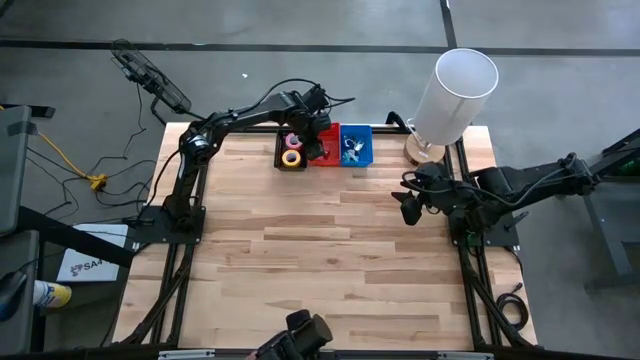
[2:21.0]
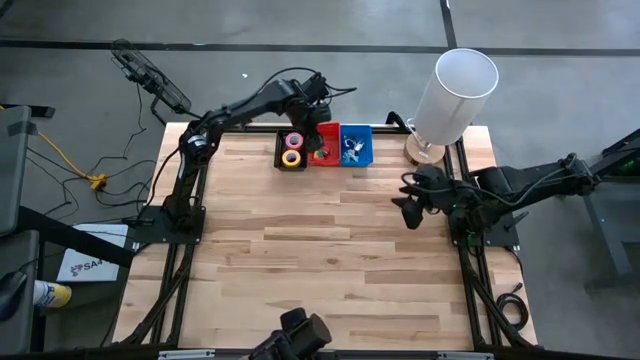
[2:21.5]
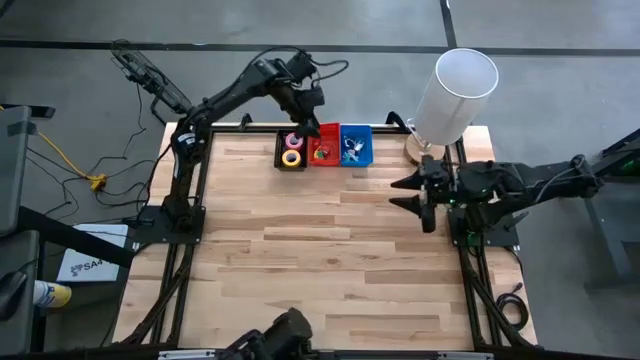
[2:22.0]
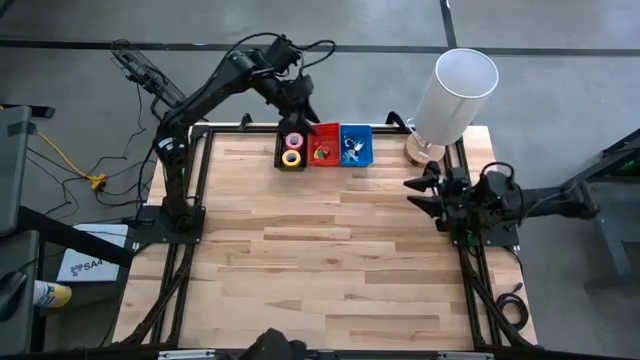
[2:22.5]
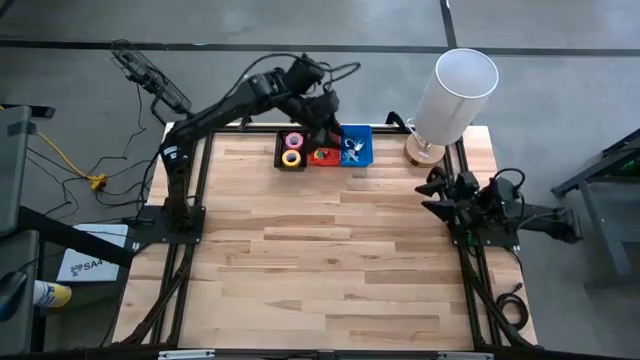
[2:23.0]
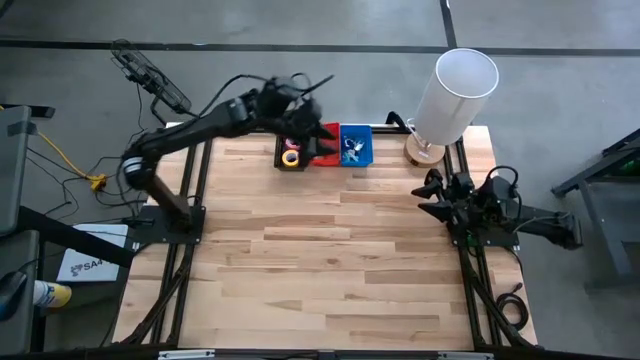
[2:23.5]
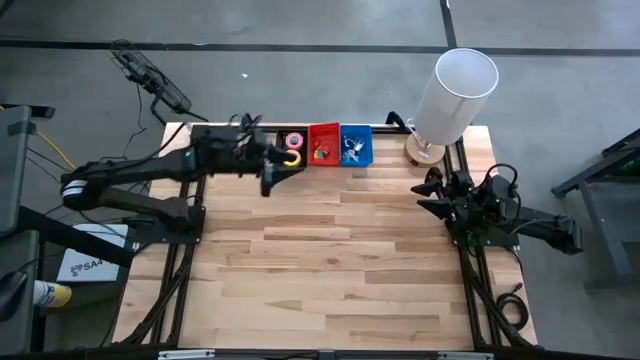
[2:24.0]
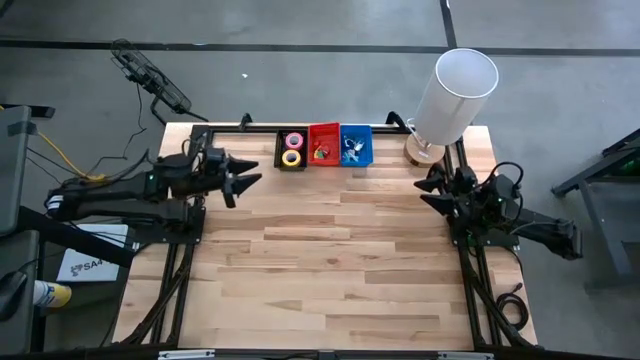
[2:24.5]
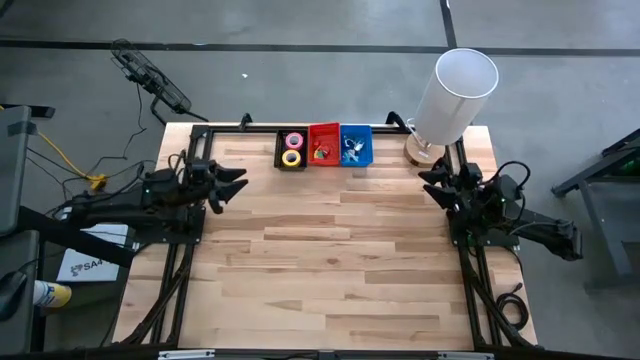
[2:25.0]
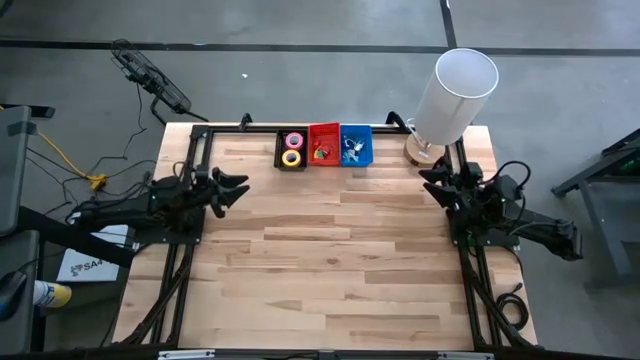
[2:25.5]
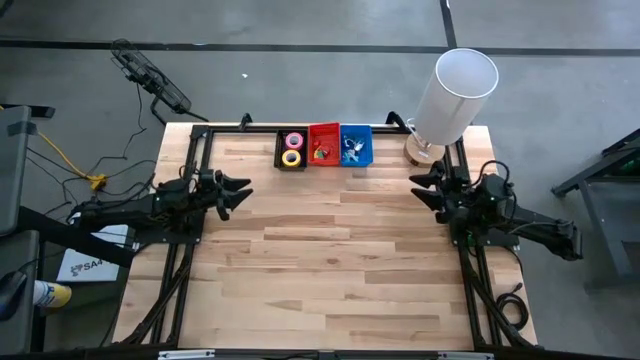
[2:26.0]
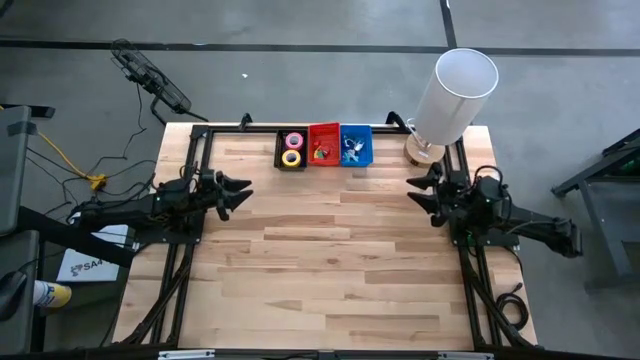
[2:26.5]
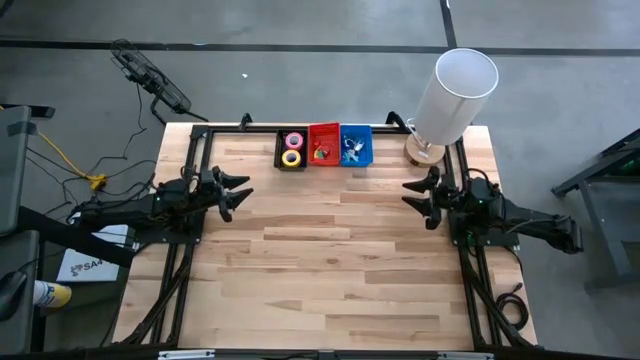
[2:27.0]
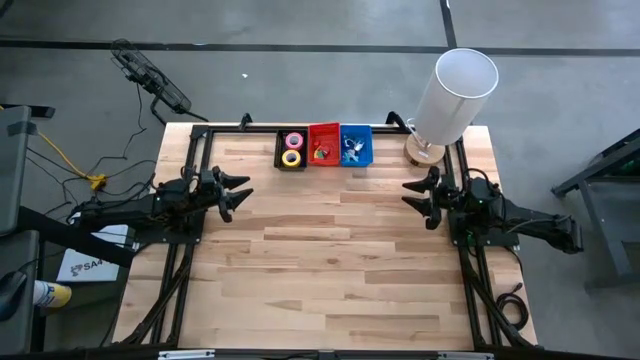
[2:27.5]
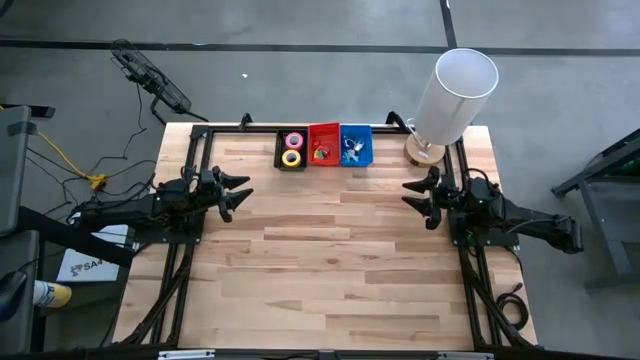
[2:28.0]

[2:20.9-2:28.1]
Task: Pick and place Stapler, Stapler remover, tape
Return to Home Position

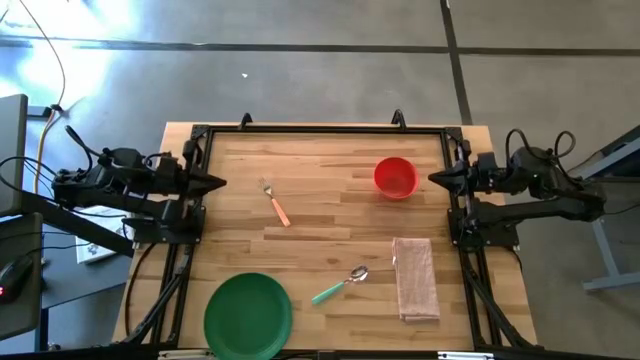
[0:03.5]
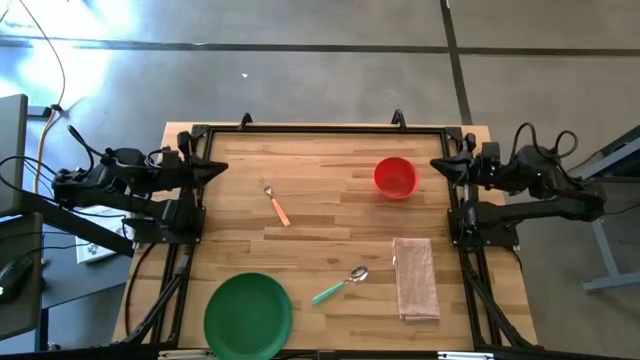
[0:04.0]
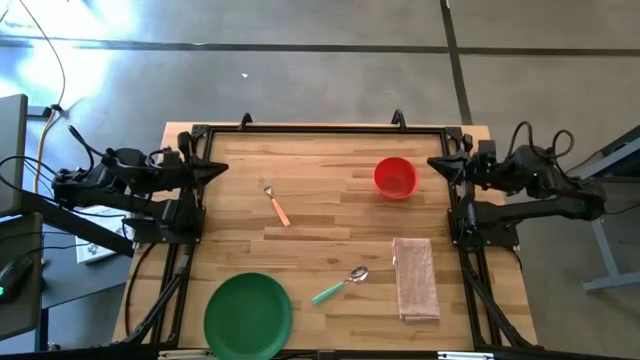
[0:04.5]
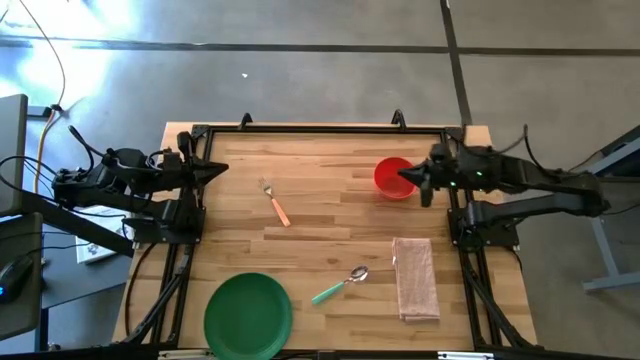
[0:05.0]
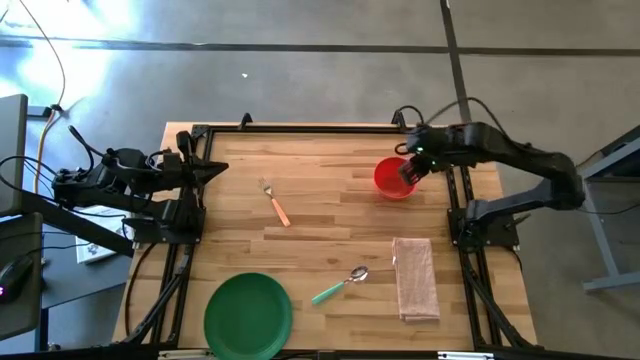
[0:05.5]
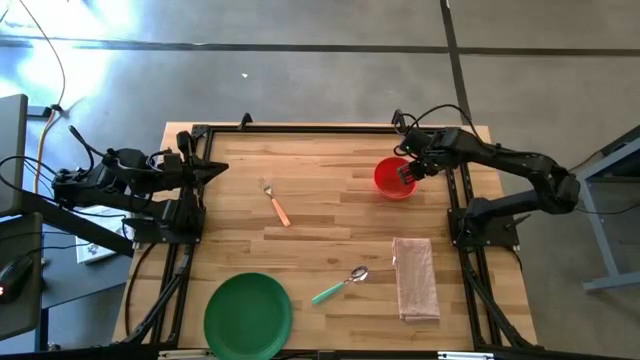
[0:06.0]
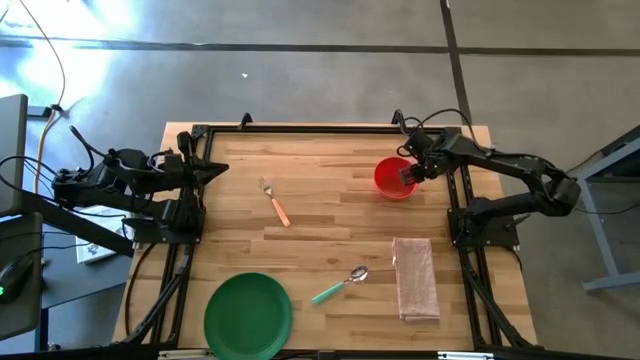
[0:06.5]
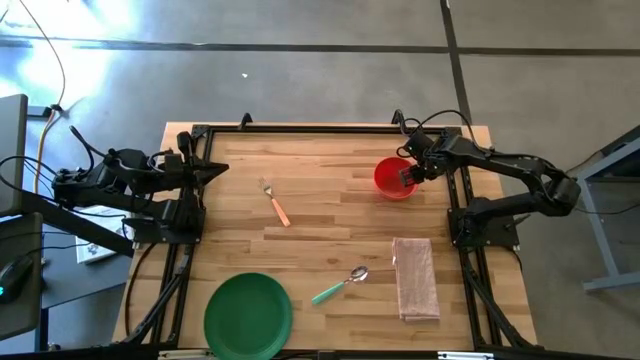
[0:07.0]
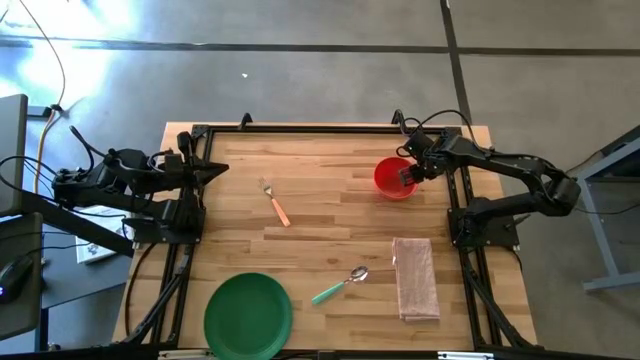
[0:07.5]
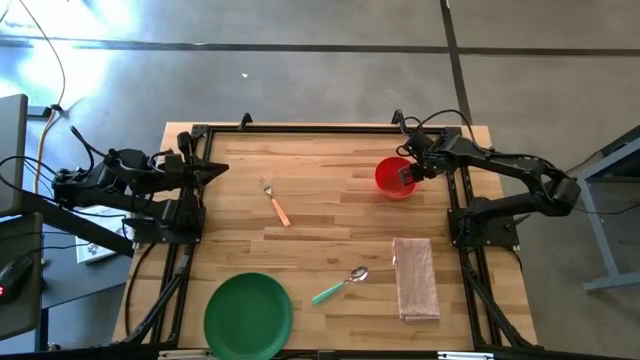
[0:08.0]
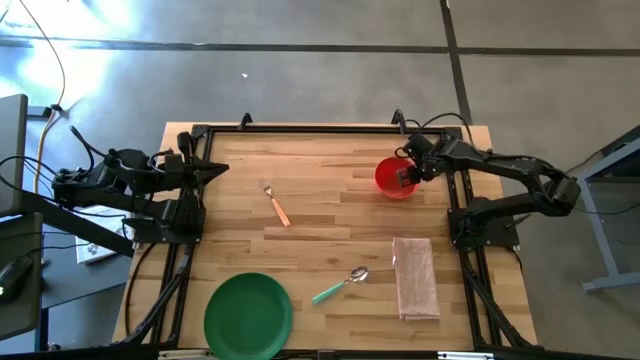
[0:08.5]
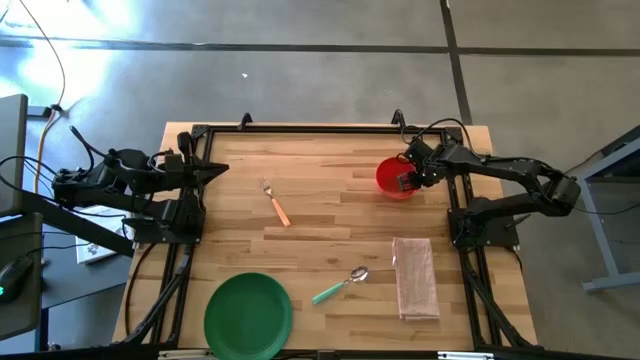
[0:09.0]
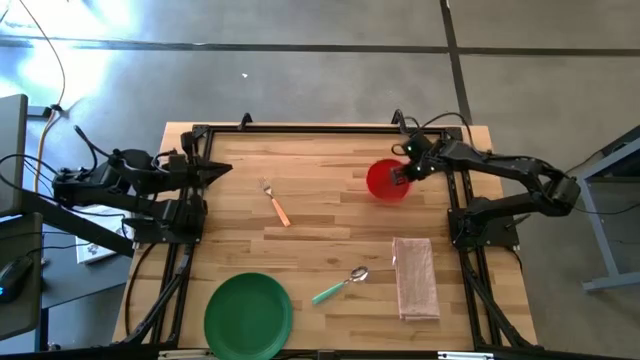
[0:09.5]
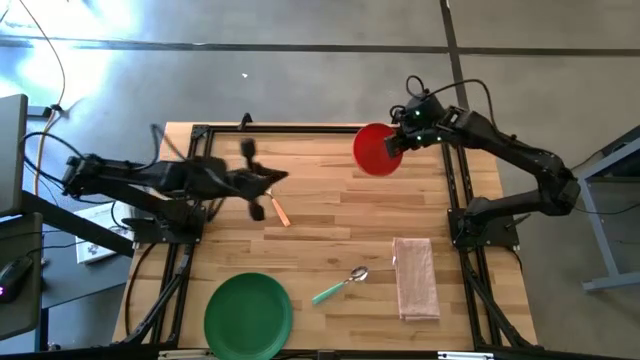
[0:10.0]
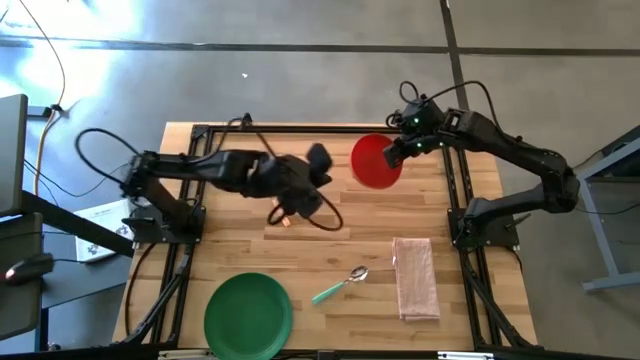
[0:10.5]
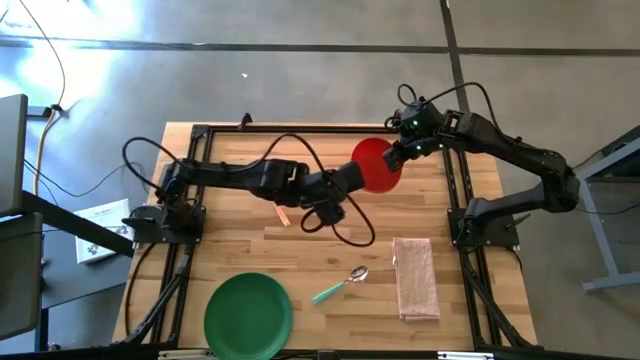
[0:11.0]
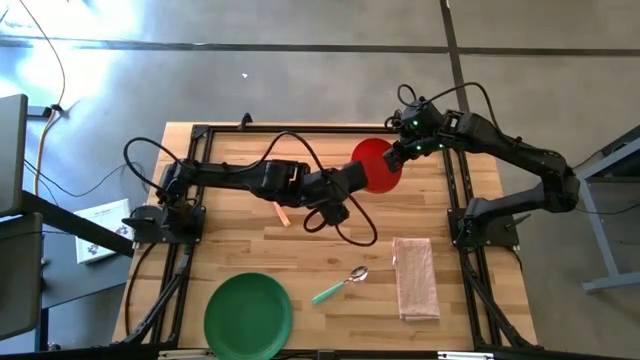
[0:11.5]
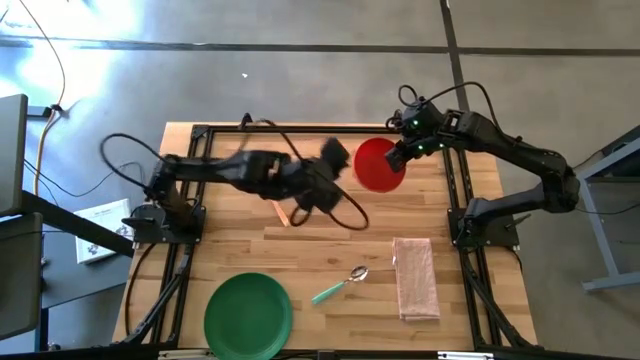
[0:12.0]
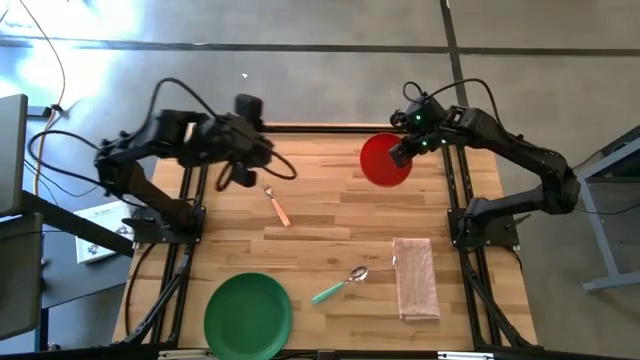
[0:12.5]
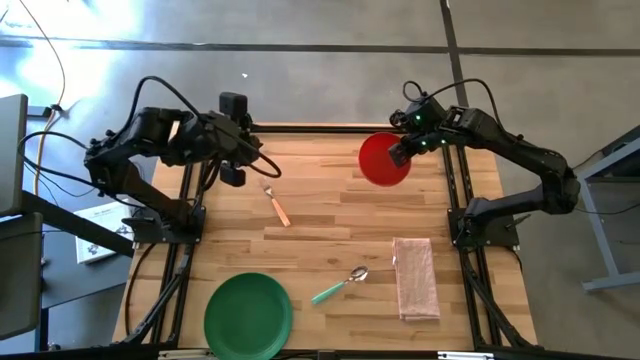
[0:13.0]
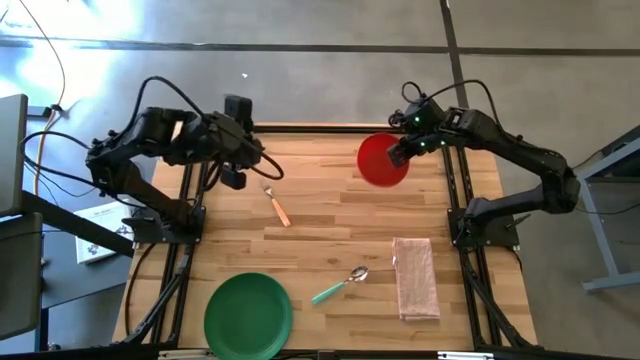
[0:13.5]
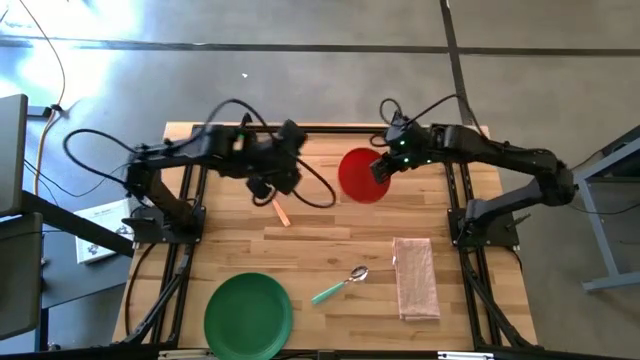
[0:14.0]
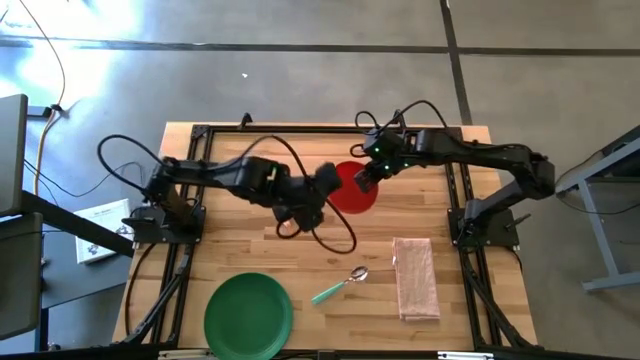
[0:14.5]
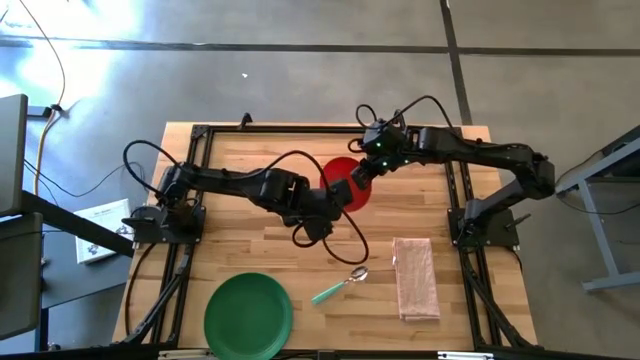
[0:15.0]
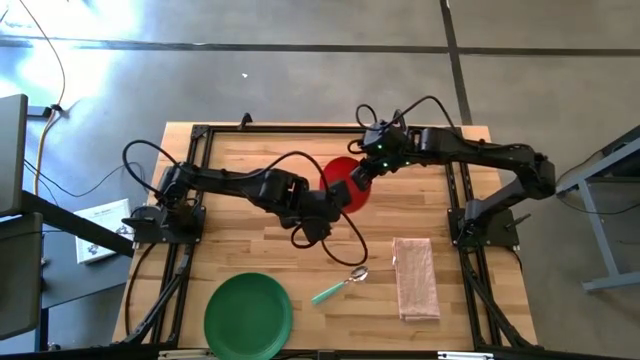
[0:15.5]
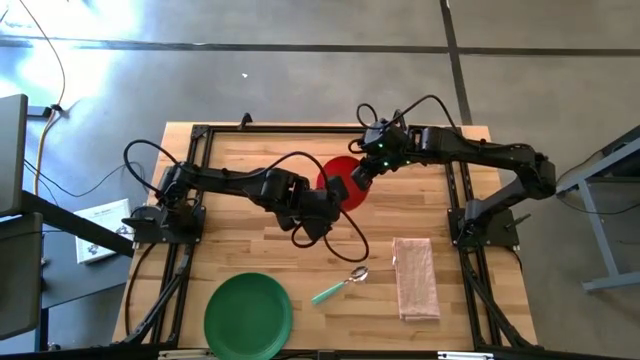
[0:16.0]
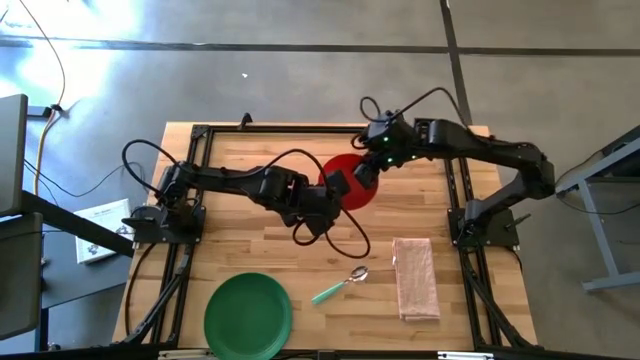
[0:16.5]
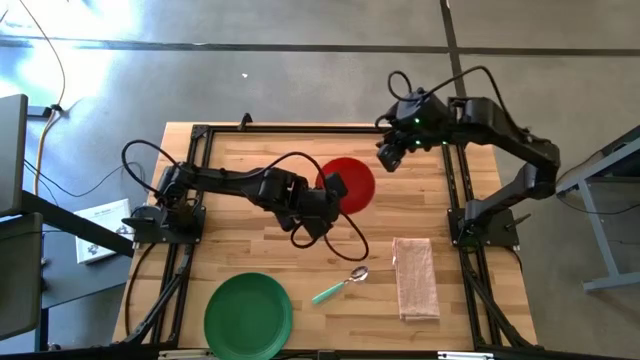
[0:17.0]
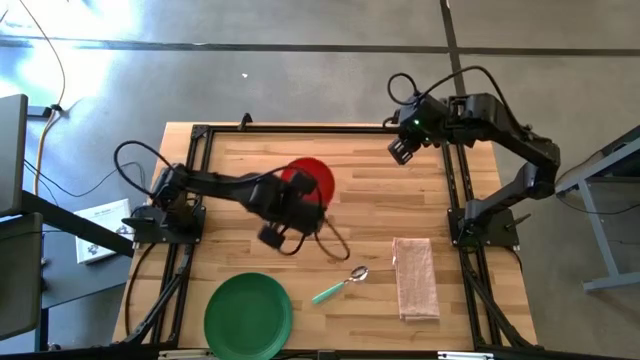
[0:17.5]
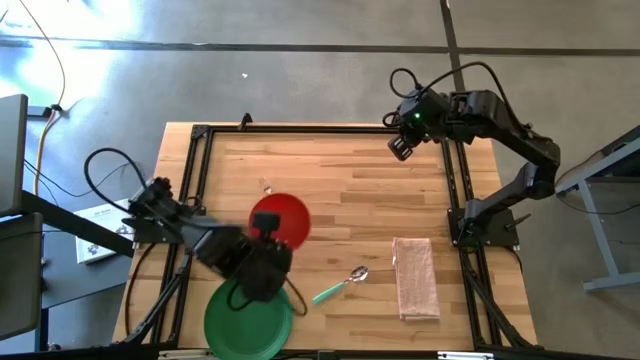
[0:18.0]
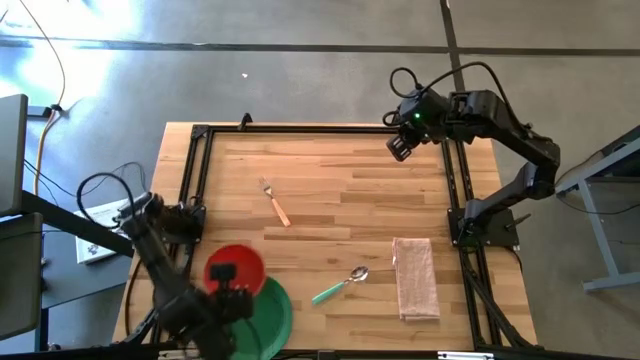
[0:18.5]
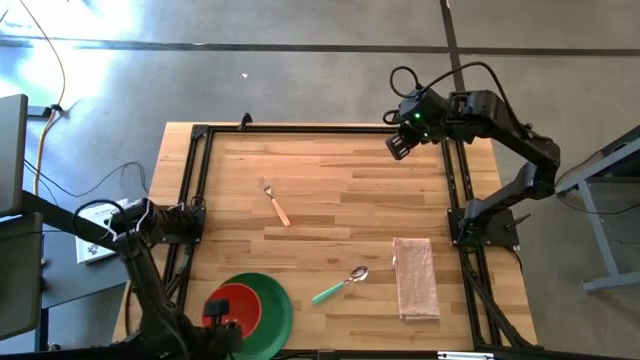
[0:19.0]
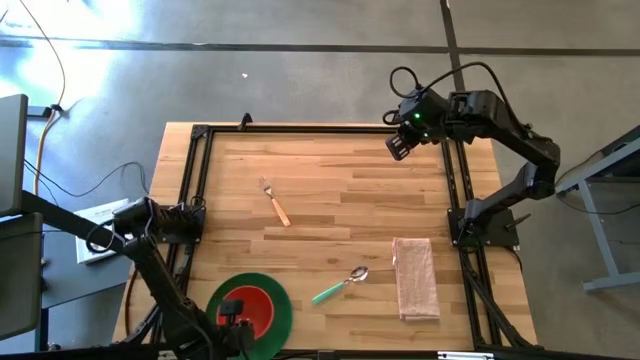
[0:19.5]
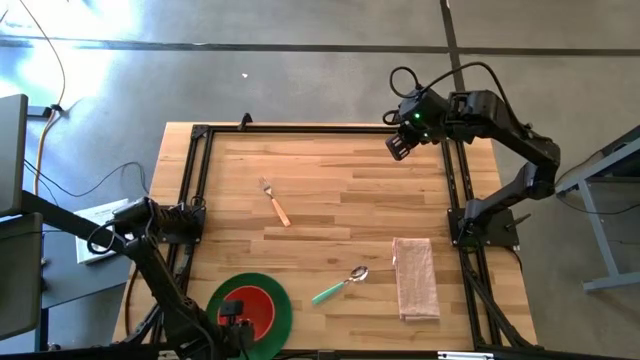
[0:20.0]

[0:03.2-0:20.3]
Task: Set table place
Put the orange bowl on the green plate
